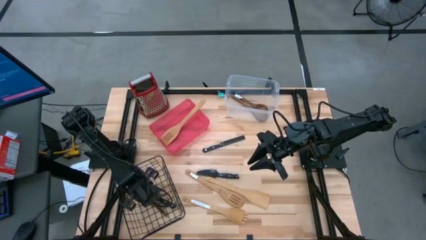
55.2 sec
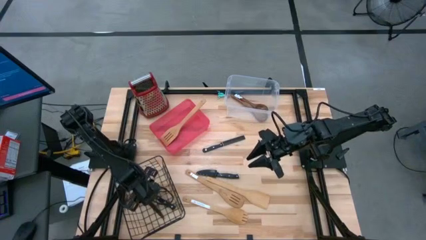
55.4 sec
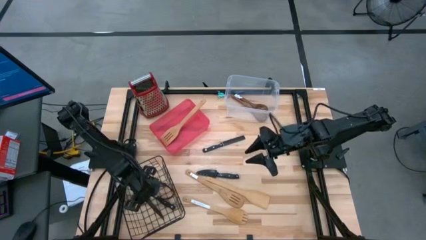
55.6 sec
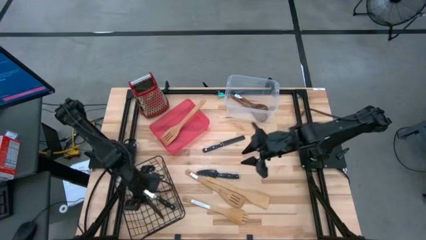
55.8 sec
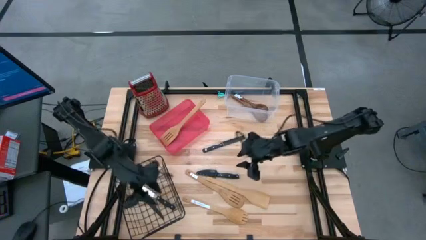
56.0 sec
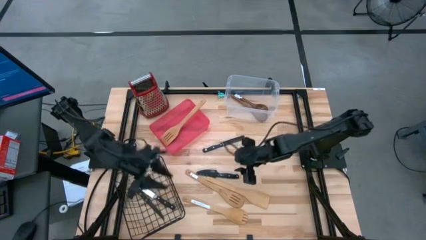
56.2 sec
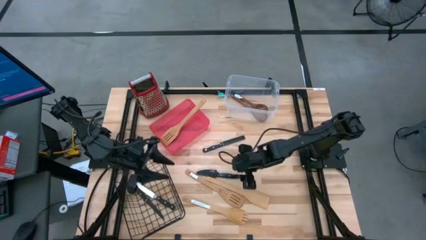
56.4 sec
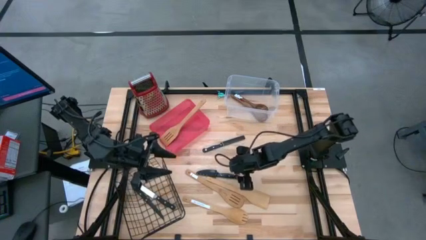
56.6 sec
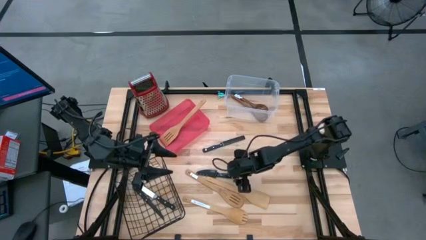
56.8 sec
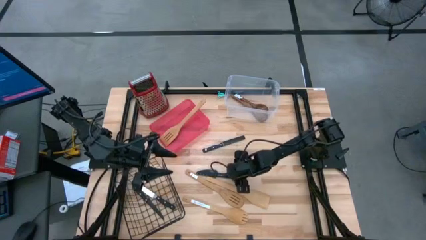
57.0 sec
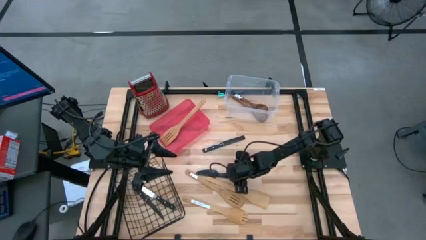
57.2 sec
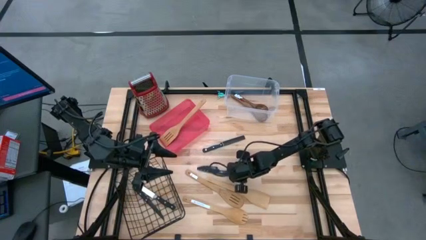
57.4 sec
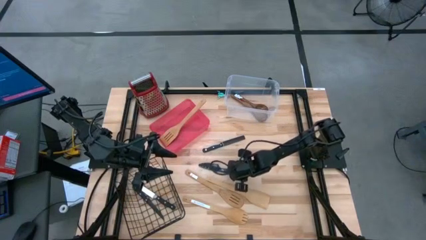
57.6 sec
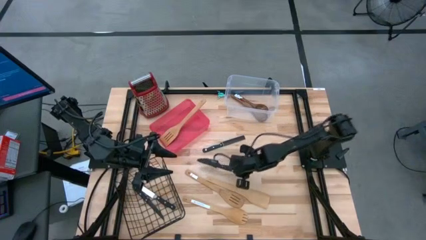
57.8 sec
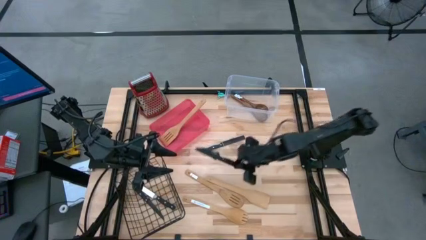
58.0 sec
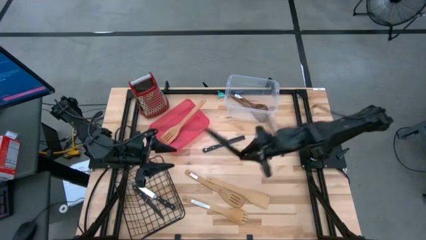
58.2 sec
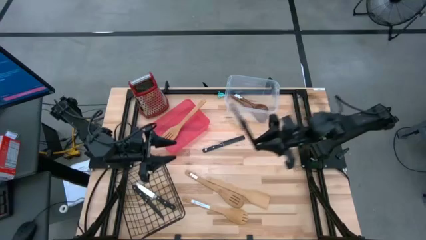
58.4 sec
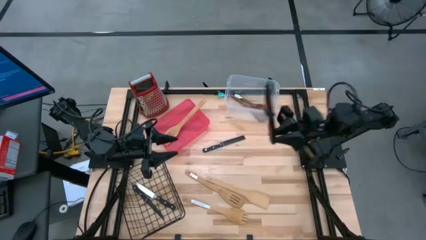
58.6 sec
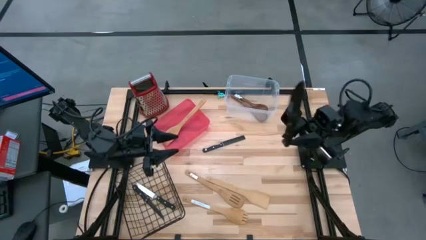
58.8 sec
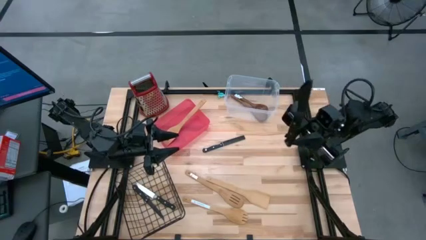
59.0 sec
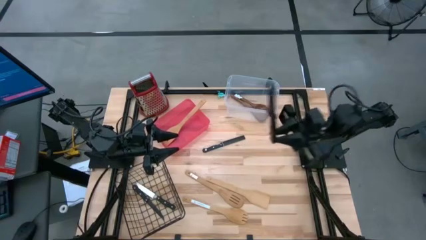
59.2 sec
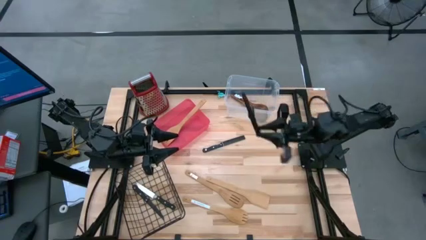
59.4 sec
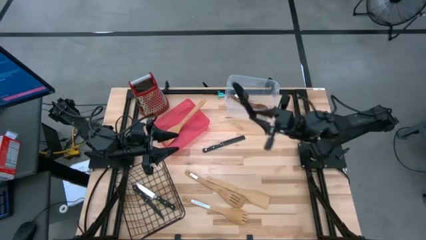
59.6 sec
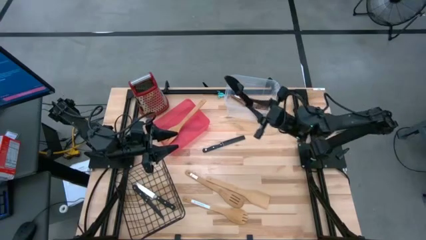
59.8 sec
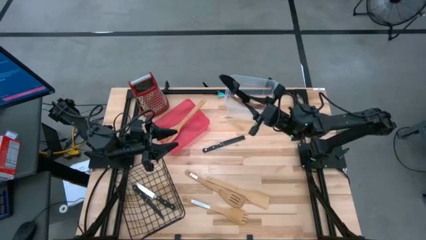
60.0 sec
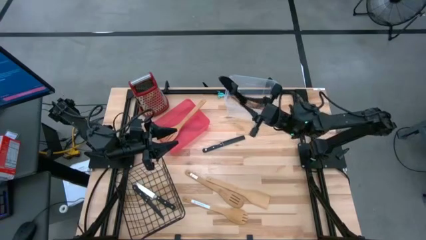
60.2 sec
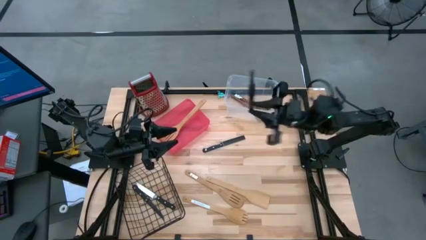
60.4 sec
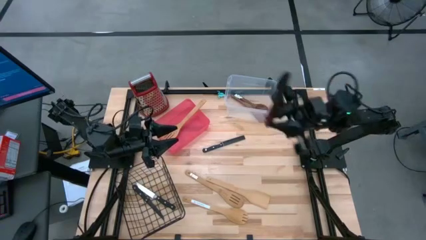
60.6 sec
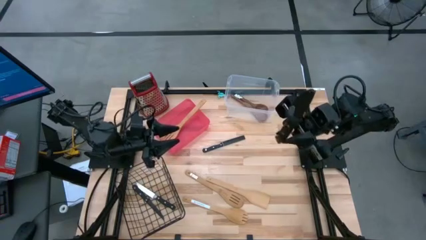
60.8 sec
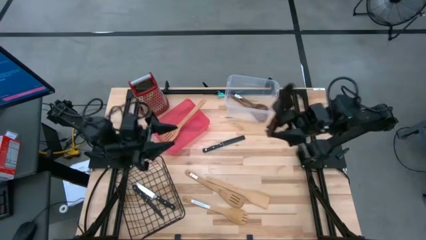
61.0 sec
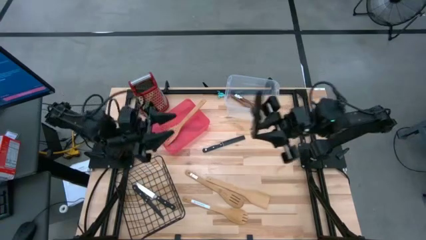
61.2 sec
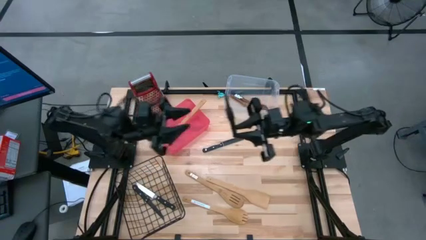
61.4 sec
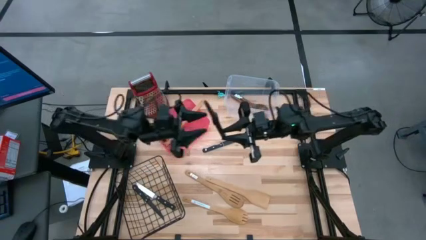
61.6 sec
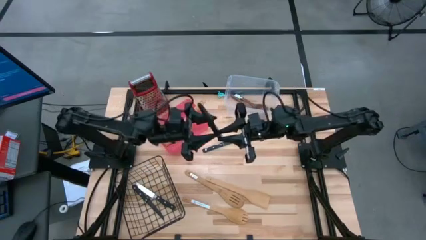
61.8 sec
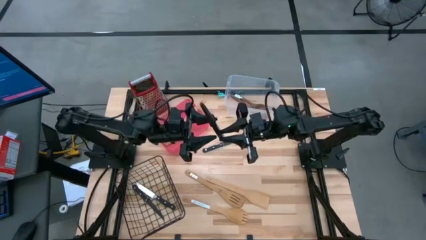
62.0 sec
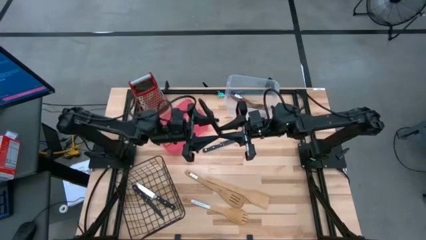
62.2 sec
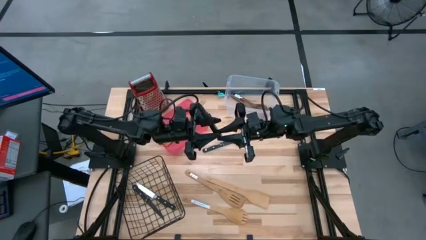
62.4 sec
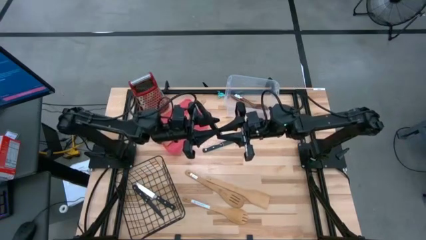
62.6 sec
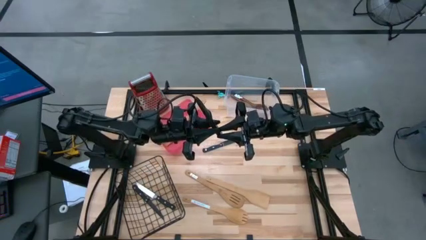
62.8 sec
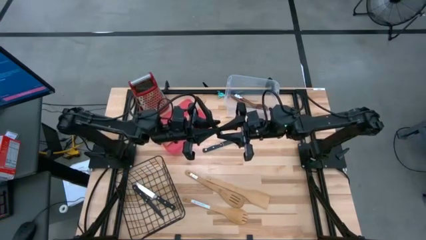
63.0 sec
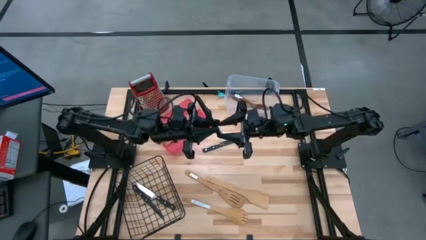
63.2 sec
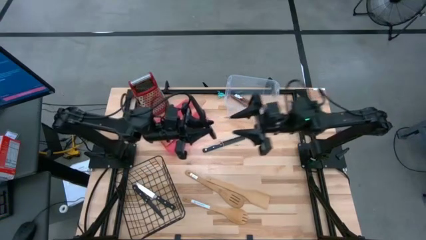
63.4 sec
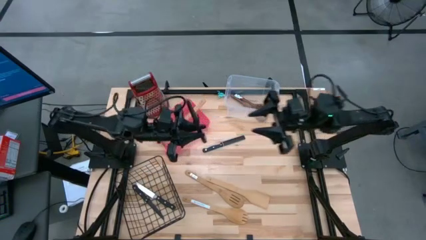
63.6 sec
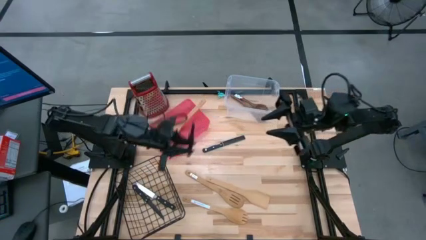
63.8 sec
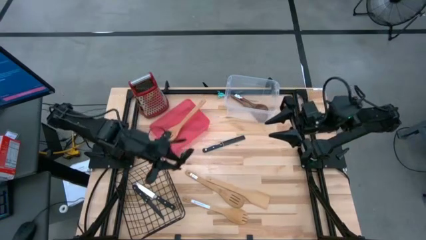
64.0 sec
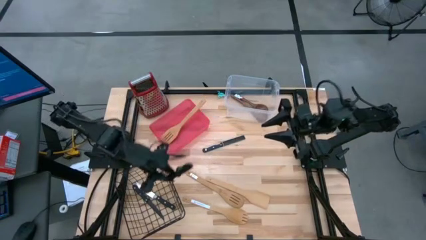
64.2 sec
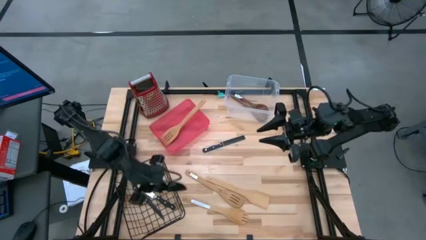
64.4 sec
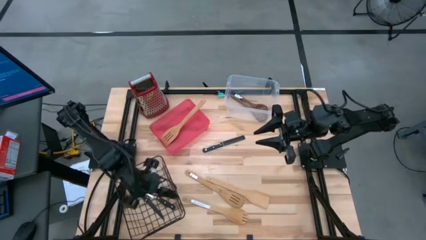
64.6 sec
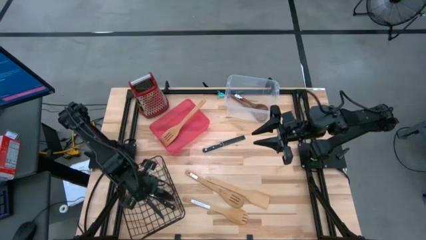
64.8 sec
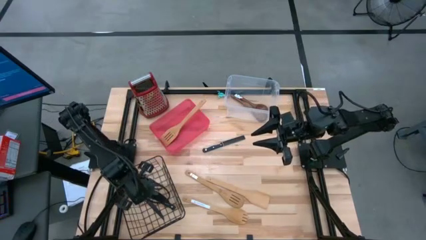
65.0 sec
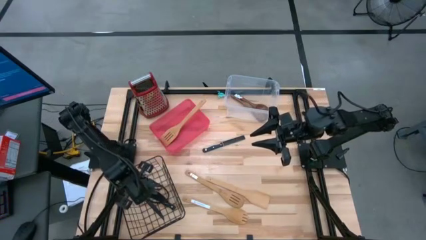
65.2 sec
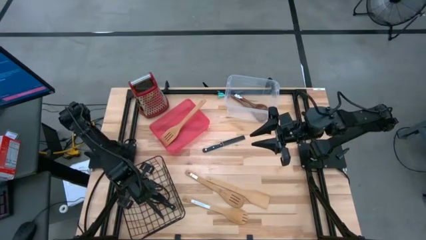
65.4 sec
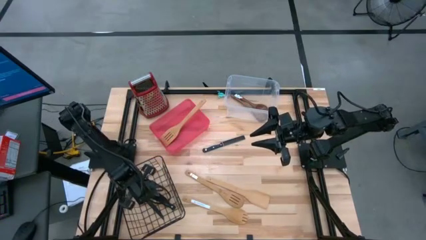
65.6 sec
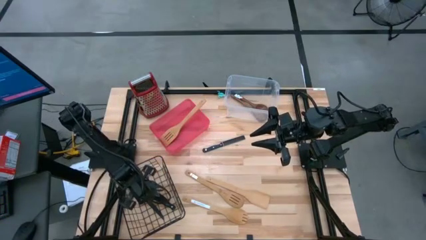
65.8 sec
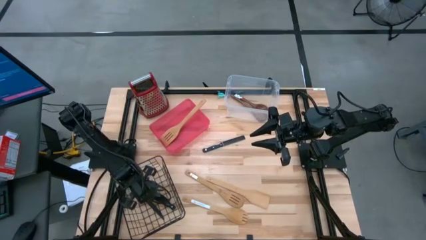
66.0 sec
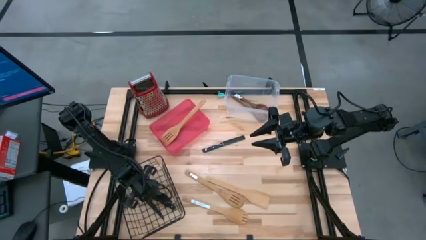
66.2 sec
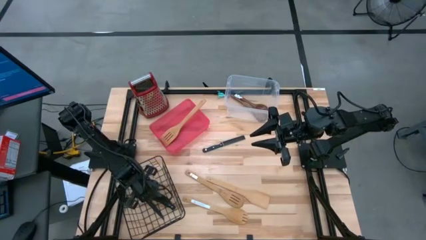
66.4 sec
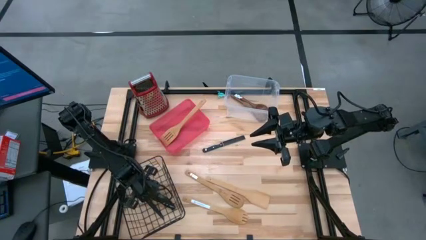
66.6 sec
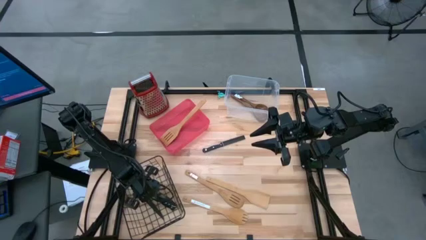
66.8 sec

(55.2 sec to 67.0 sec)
Task: Pick & Place Kitchen Items
Put the black kitchen knife into the wire basket

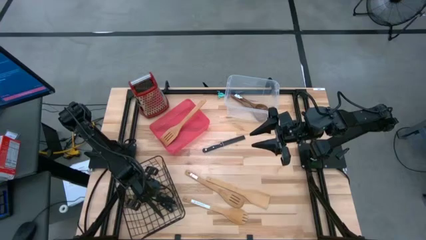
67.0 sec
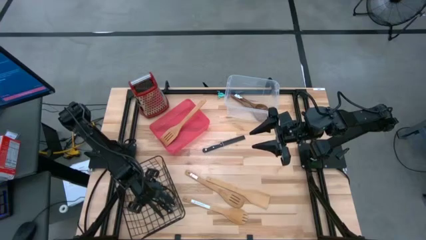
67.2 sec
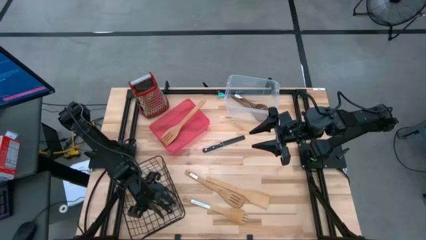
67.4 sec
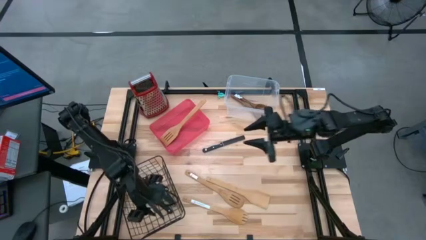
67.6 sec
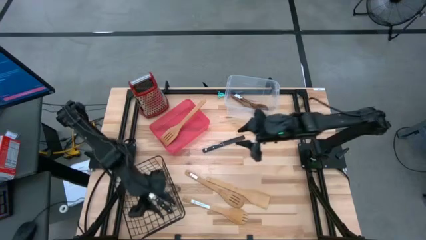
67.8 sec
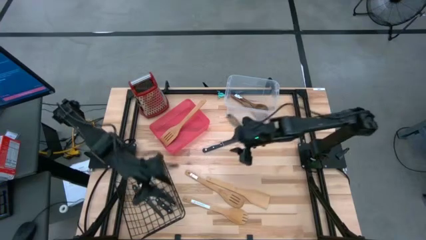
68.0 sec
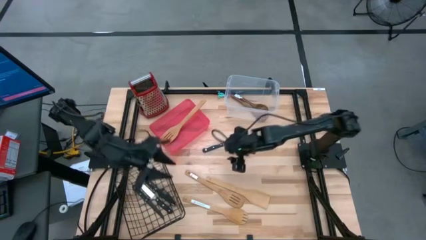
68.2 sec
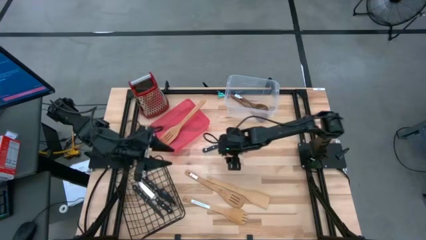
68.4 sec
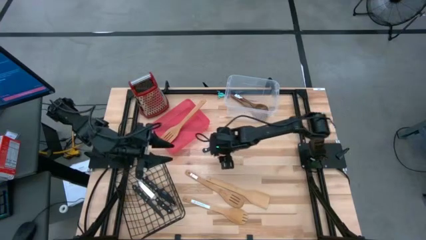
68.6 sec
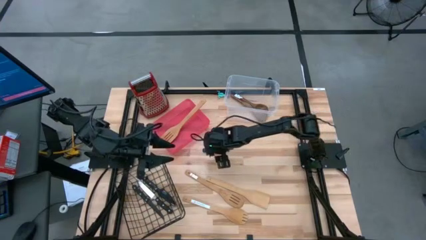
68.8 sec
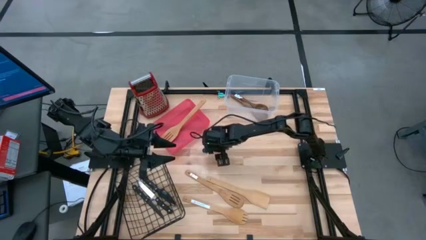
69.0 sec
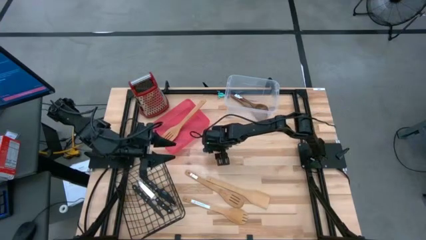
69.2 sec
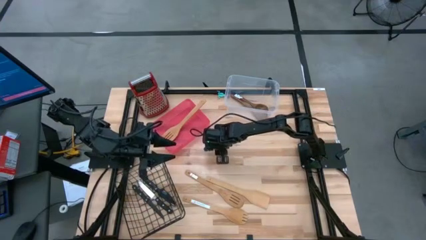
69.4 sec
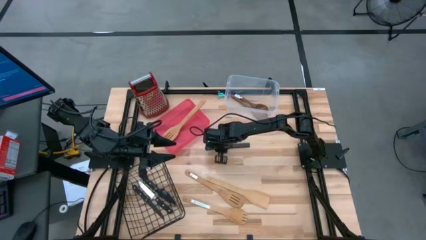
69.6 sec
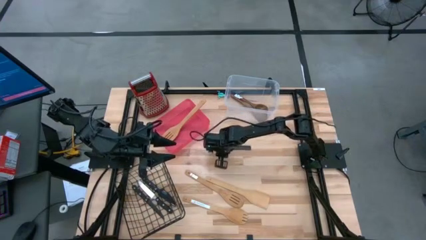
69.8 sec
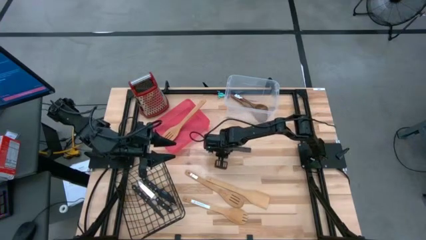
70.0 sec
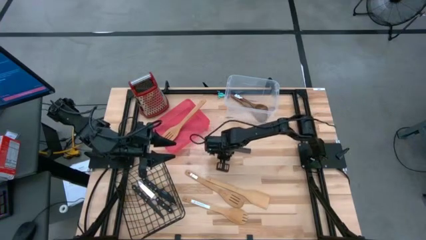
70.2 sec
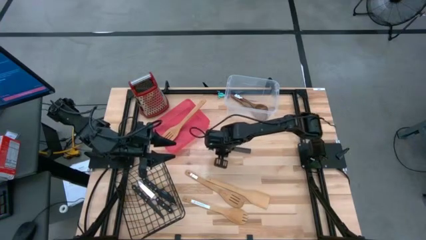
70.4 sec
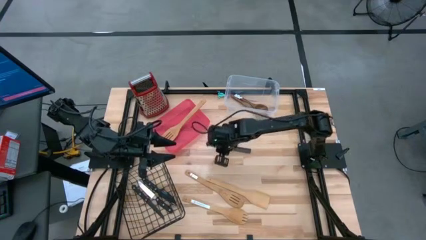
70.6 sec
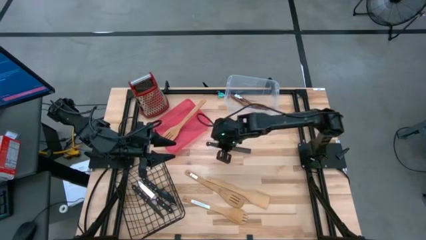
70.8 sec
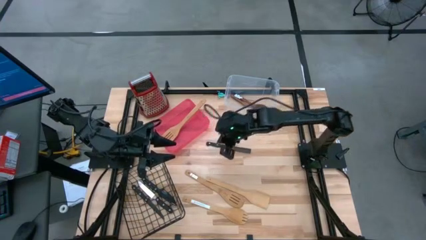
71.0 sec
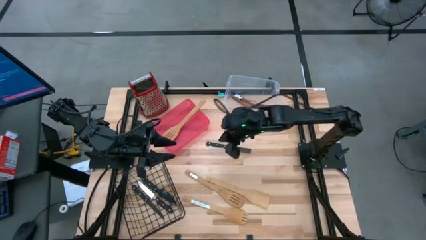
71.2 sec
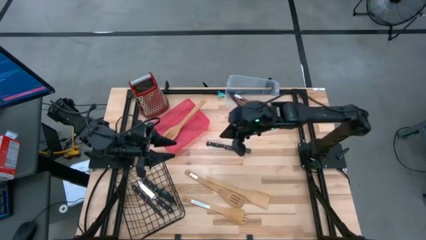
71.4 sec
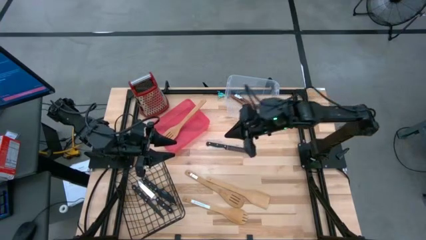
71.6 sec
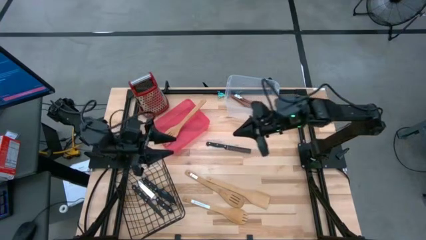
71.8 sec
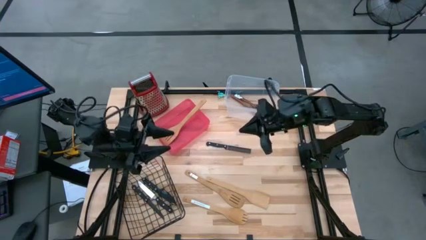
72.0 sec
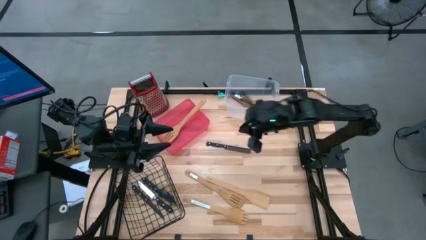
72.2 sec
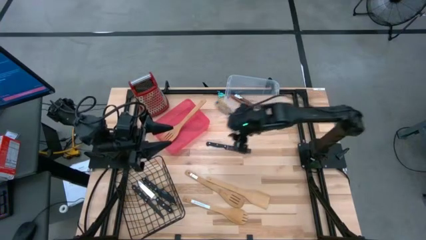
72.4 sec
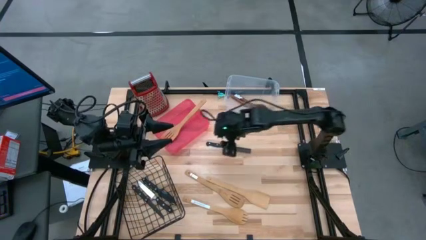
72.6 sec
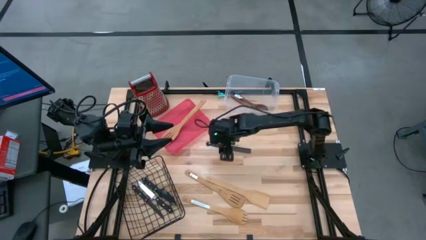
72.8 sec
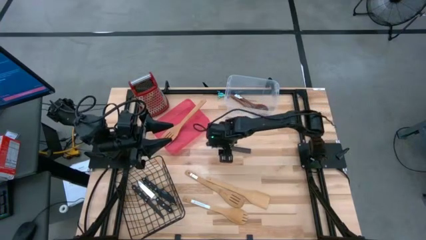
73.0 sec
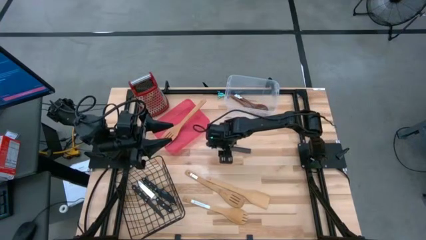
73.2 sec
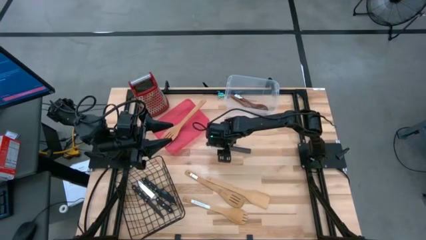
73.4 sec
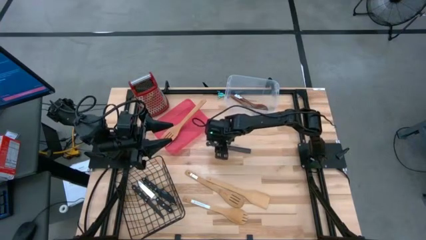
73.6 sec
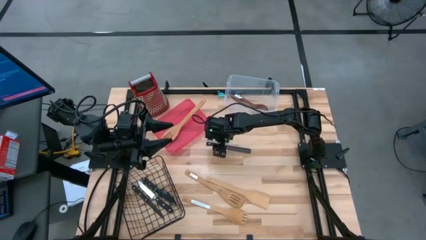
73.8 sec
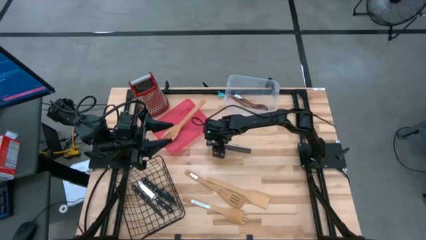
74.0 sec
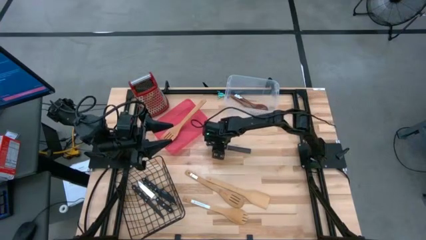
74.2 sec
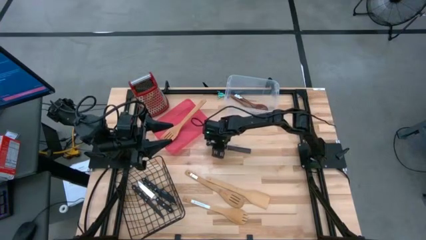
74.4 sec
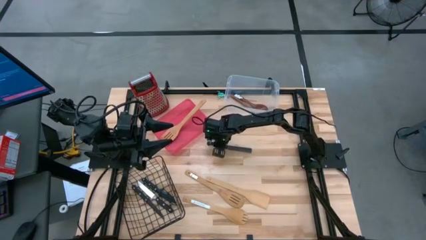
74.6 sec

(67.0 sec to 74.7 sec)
Put the black kitchen knife into the wire basket
